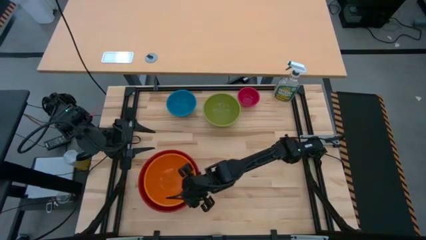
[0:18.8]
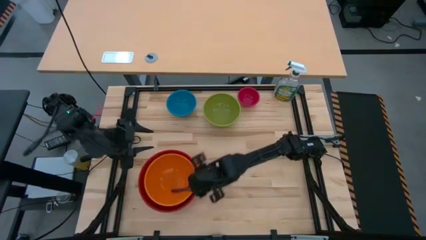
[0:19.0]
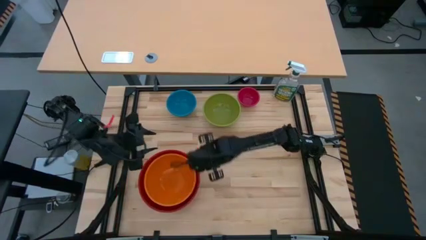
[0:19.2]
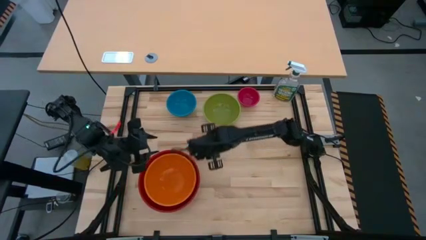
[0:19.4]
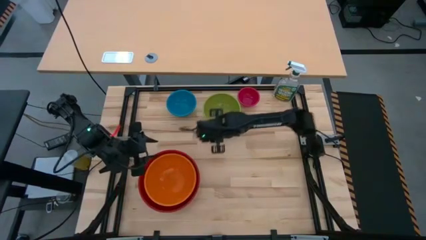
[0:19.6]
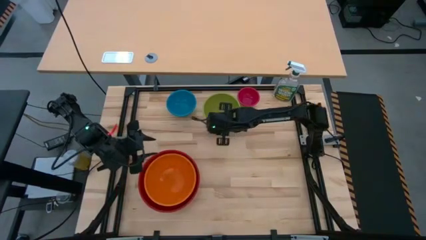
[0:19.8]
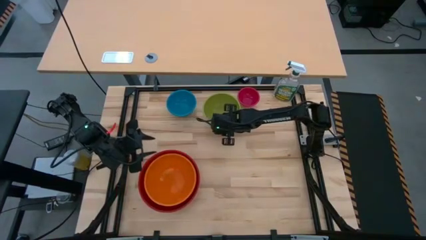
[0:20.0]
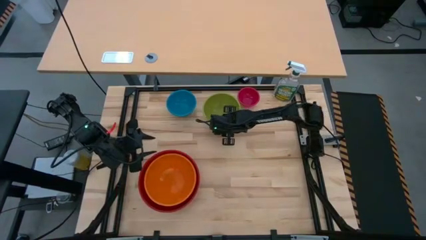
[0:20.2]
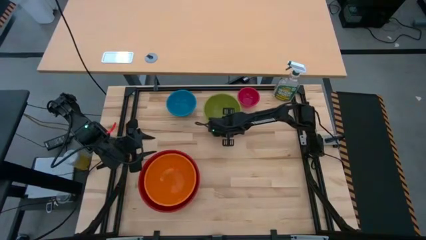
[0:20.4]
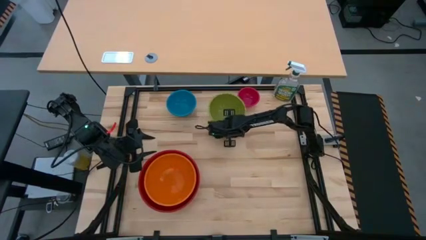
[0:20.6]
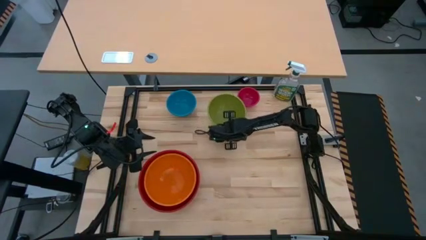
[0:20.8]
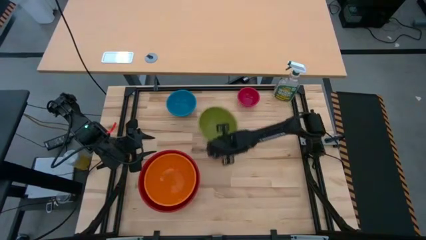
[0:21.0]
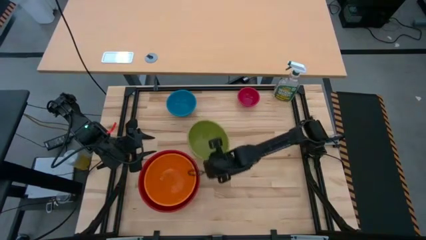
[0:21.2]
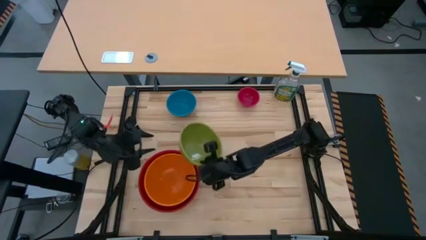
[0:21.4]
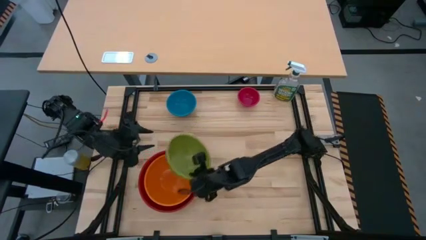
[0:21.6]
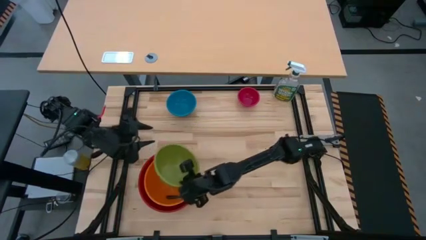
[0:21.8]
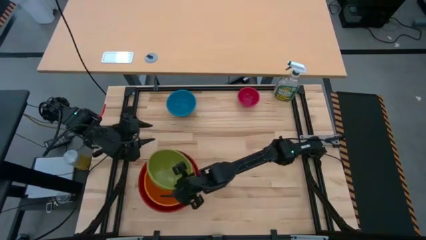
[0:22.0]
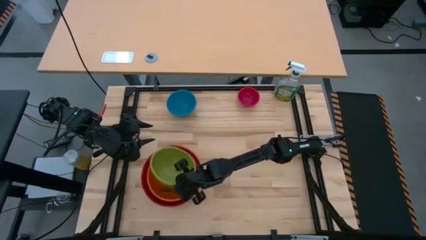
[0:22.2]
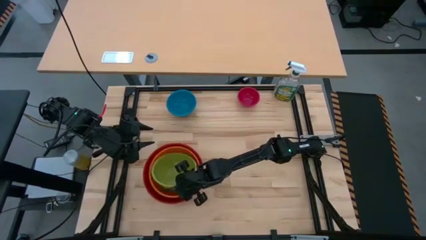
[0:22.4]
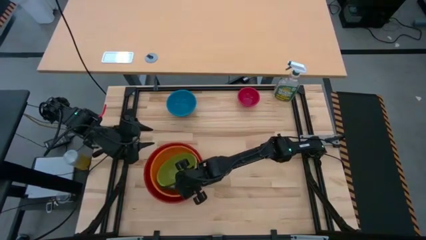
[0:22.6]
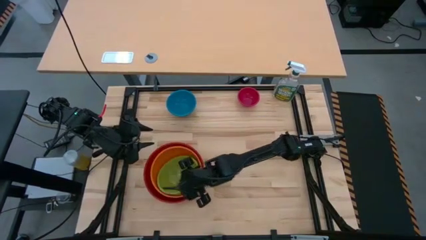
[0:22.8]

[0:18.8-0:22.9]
Stack the green bowl on top of the orange bowl

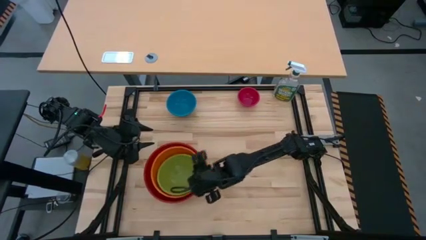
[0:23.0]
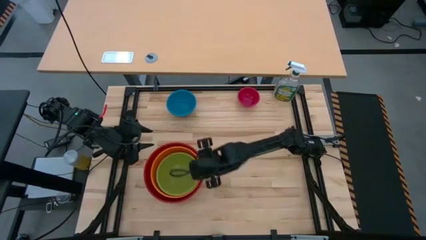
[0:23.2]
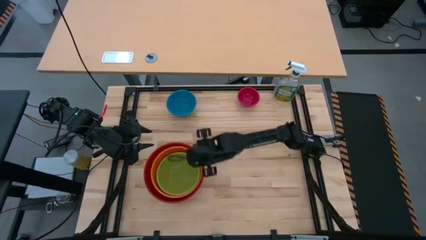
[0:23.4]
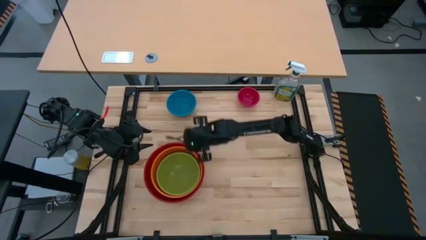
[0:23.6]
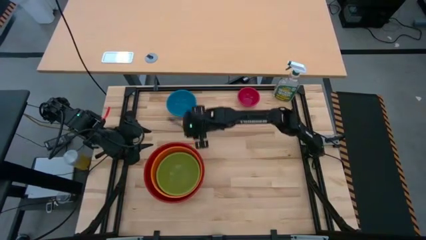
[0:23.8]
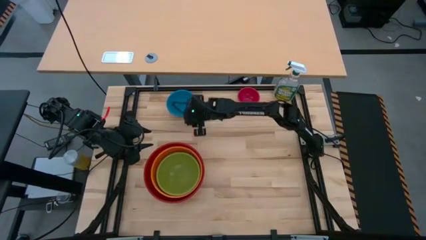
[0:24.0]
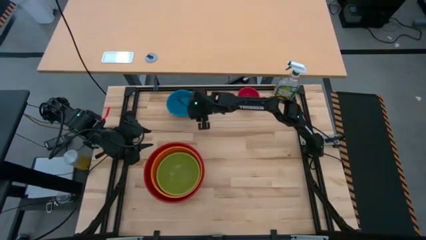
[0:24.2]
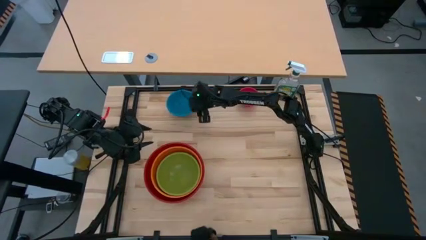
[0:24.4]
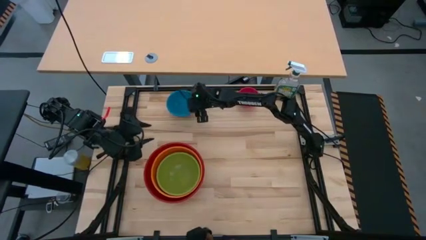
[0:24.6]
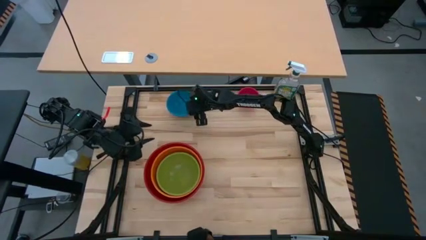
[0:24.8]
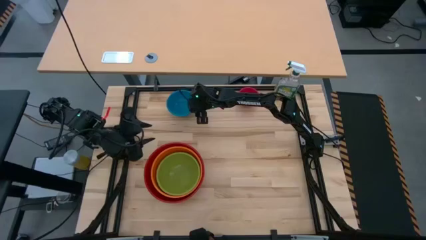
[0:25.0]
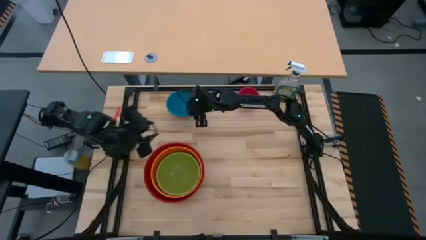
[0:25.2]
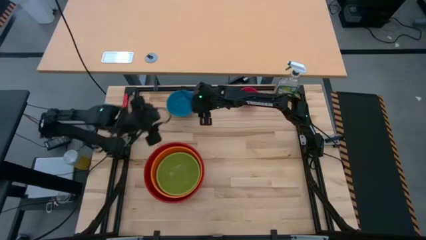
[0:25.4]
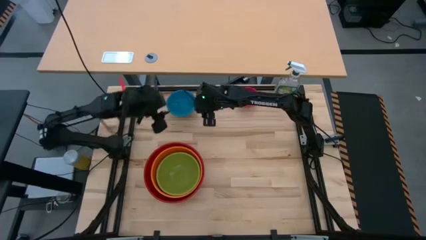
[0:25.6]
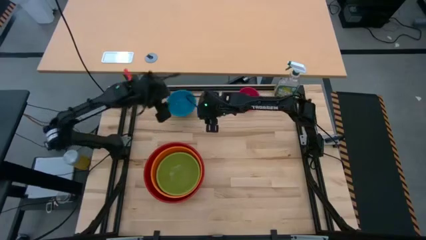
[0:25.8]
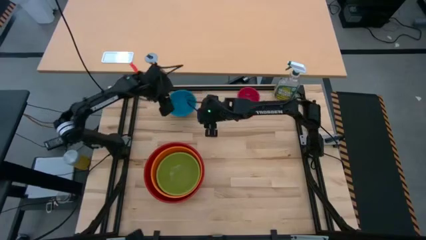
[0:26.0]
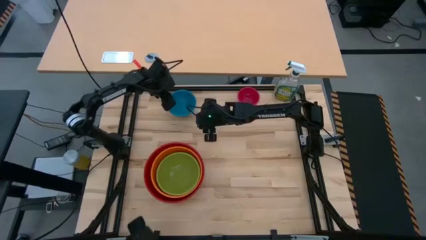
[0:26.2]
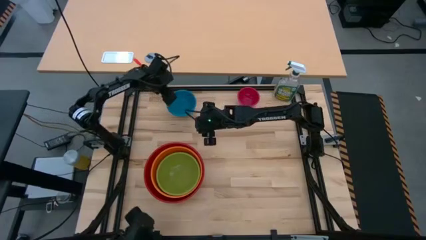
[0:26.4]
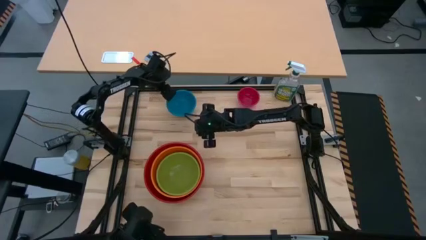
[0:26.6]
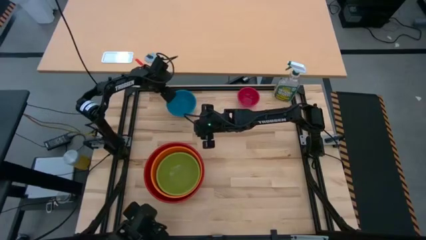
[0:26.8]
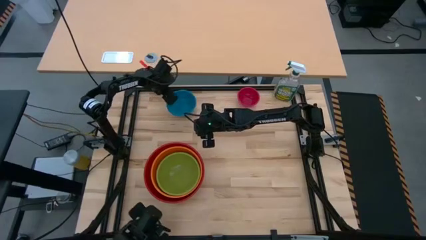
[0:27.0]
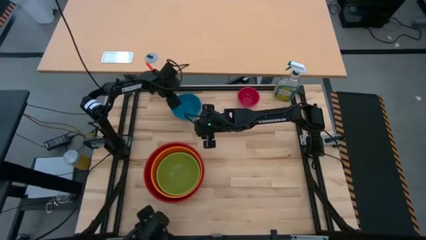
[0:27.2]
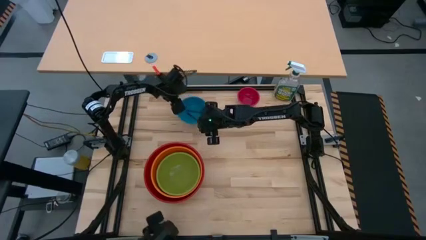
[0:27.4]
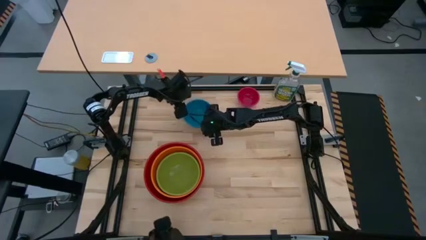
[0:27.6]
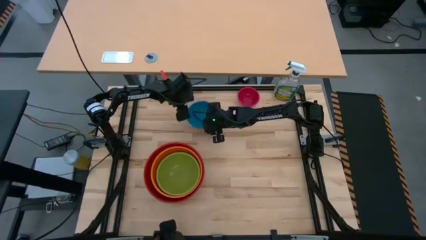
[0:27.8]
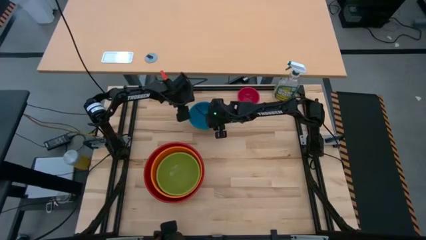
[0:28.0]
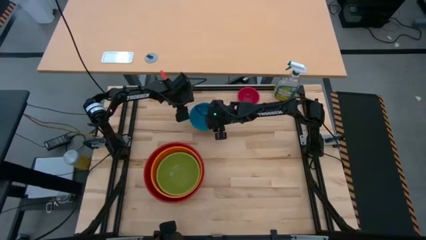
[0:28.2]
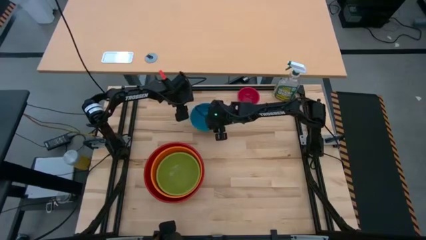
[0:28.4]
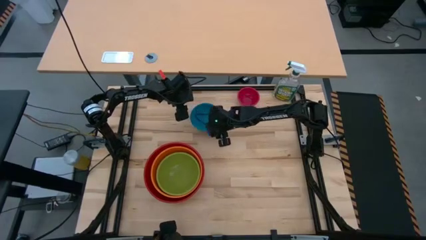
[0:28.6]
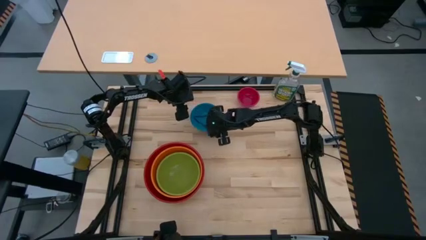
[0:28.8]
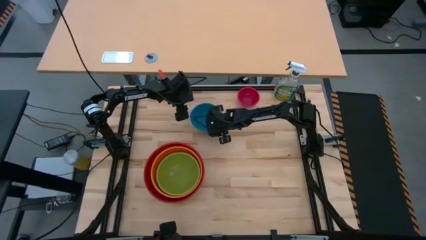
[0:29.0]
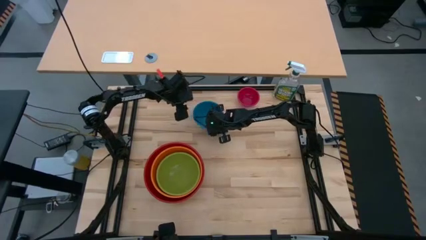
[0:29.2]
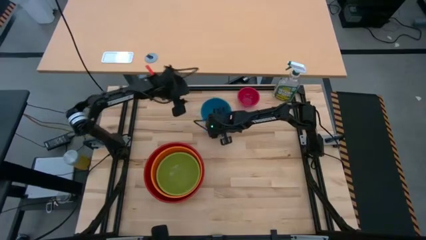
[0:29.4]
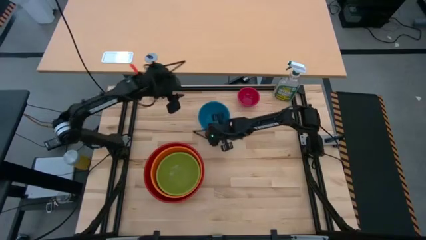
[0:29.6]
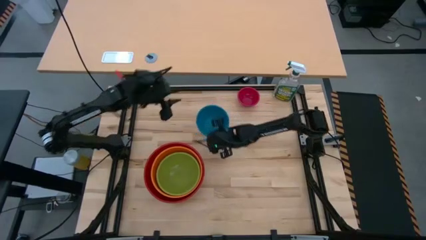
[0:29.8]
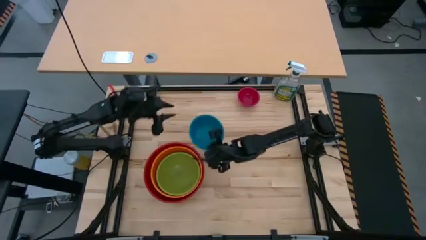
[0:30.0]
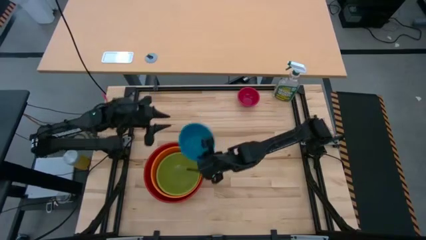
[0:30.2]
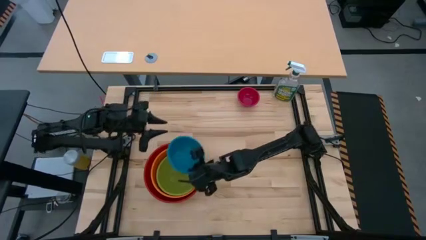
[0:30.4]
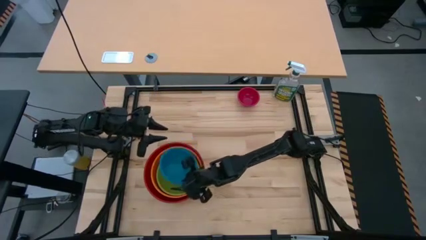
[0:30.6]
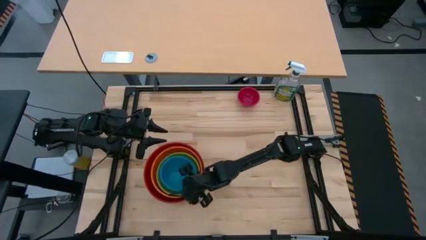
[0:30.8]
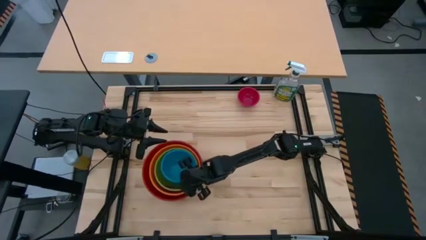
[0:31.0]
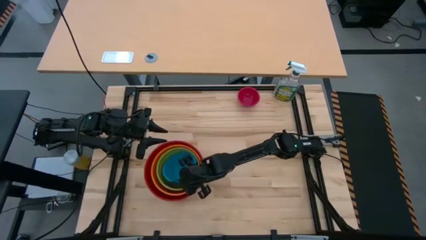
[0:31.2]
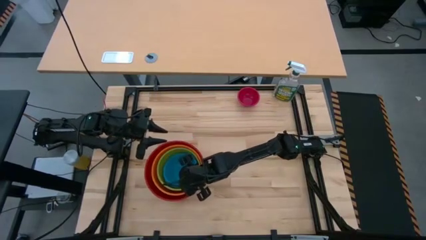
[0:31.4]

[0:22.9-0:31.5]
Stack the blue bowl on top of the green bowl

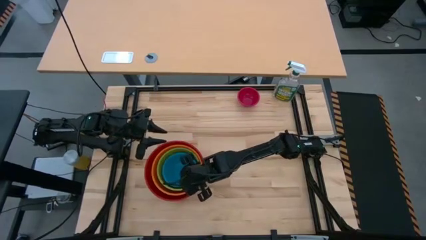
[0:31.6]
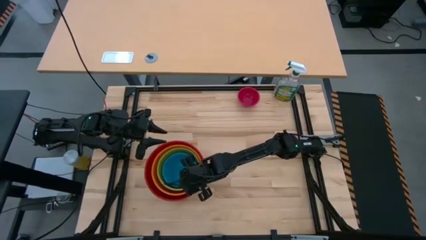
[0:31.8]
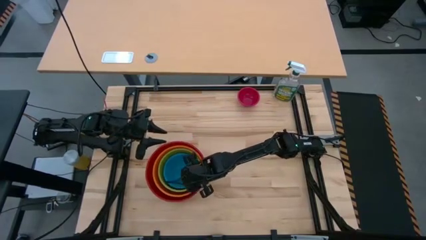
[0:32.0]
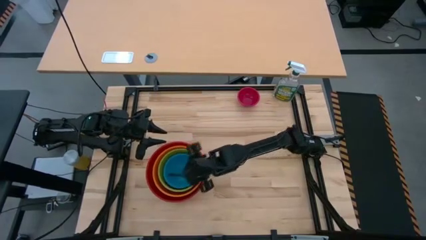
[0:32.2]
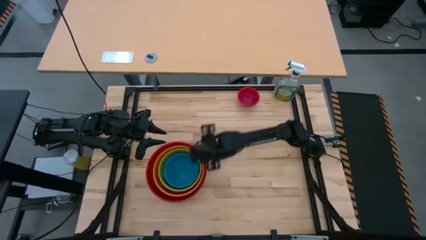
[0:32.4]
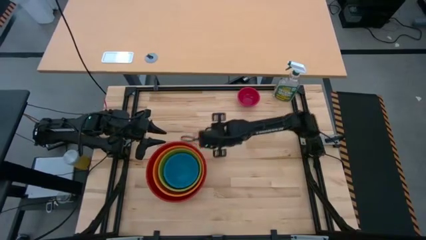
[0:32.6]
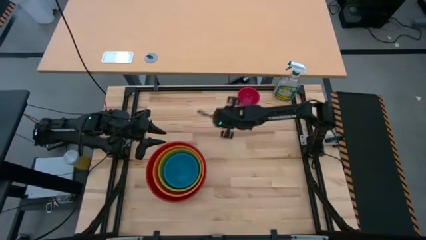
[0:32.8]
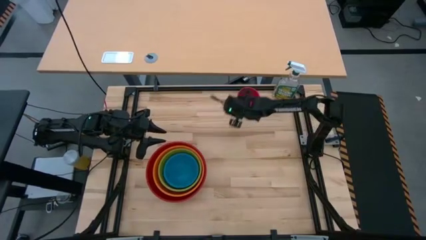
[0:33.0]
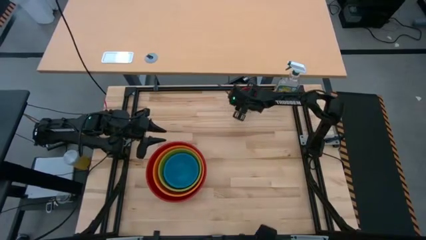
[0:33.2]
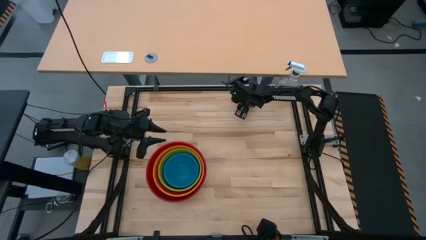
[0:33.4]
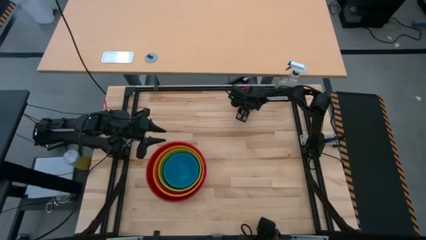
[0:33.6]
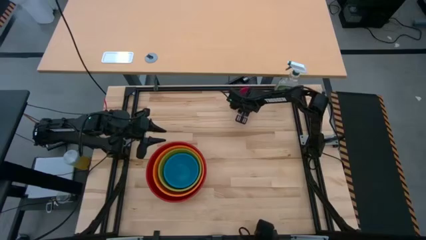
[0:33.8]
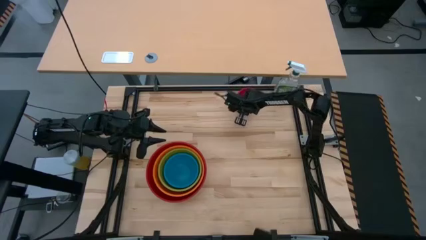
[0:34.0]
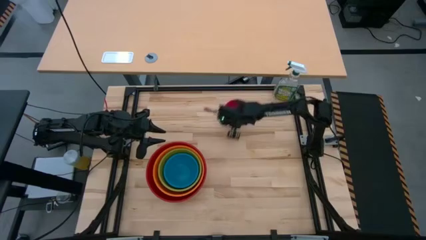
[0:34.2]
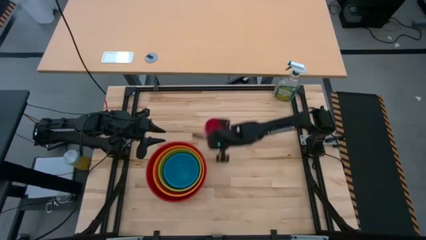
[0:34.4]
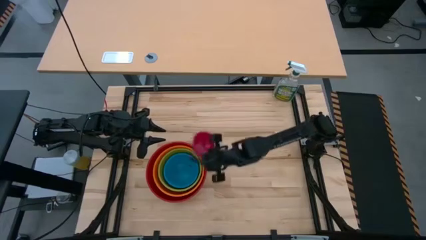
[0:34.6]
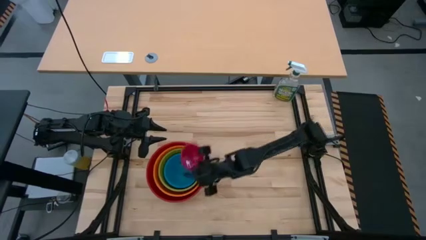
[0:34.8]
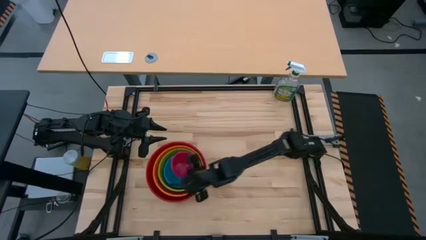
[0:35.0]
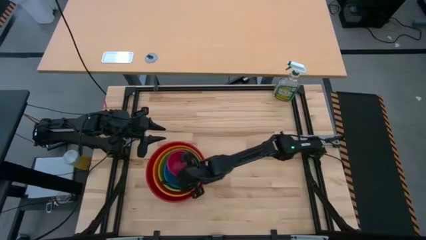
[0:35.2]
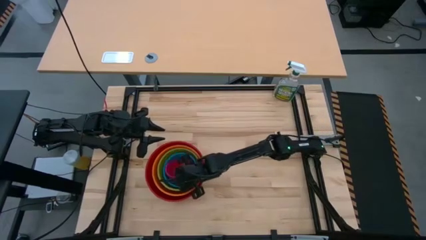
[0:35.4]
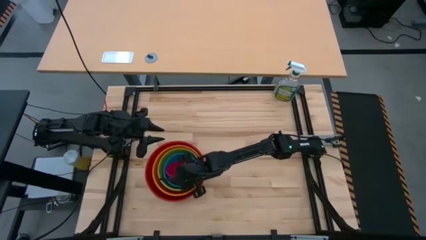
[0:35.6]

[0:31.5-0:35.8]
Stack the pink bowl on top of the blue bowl
